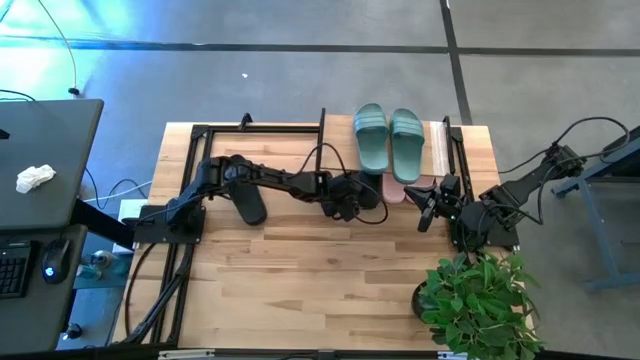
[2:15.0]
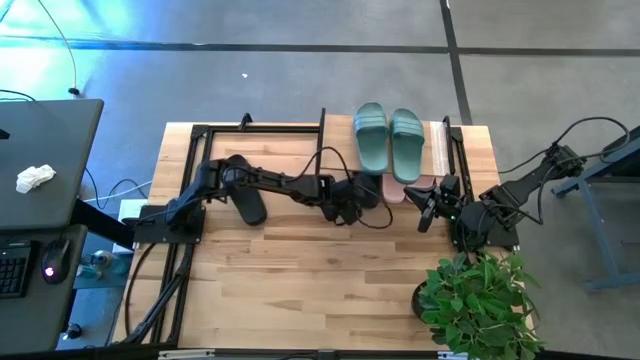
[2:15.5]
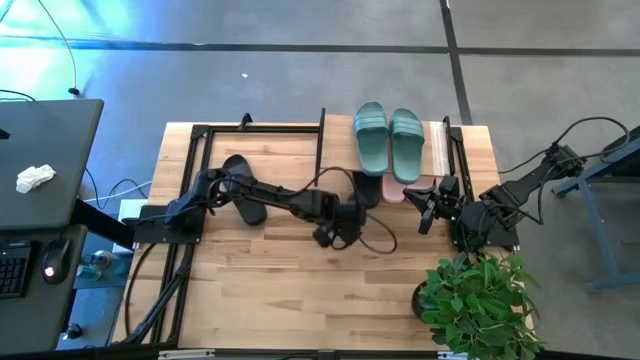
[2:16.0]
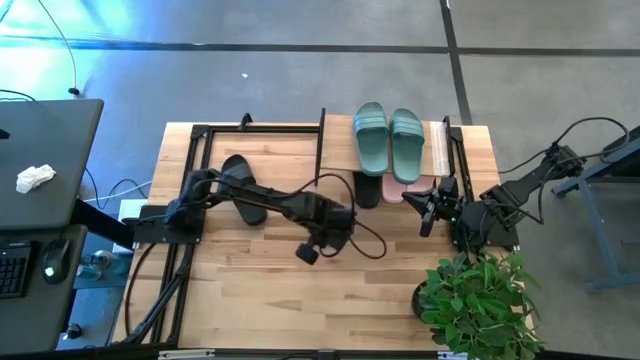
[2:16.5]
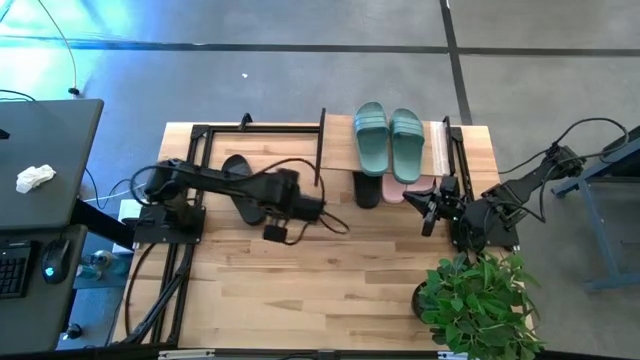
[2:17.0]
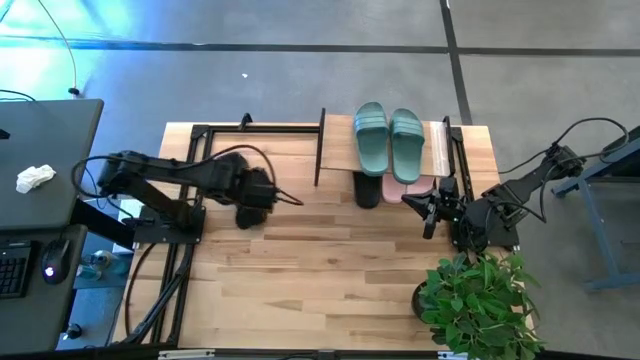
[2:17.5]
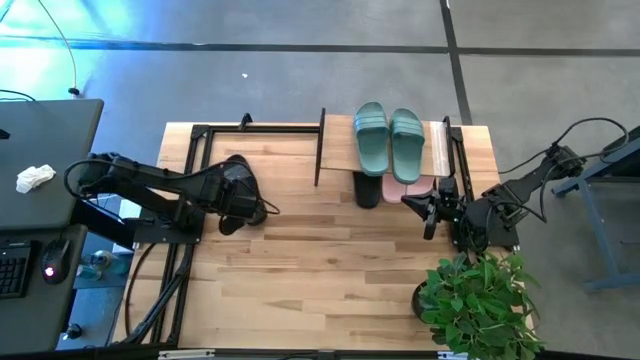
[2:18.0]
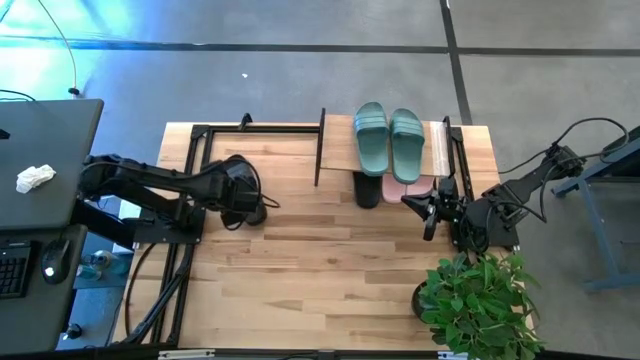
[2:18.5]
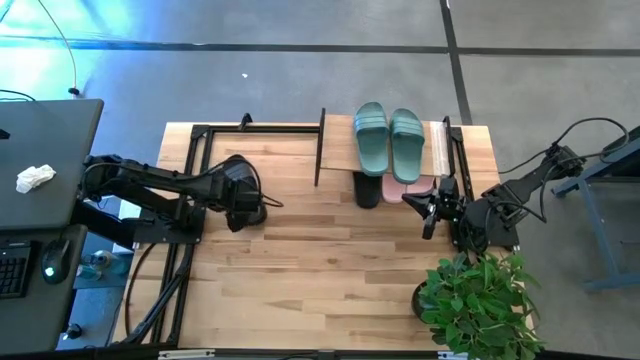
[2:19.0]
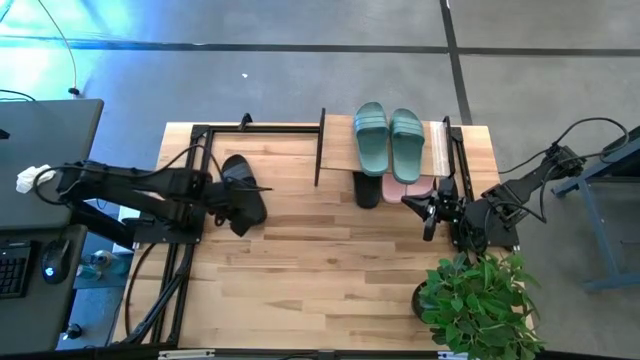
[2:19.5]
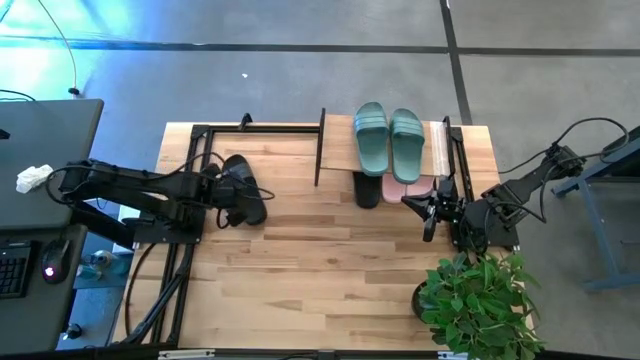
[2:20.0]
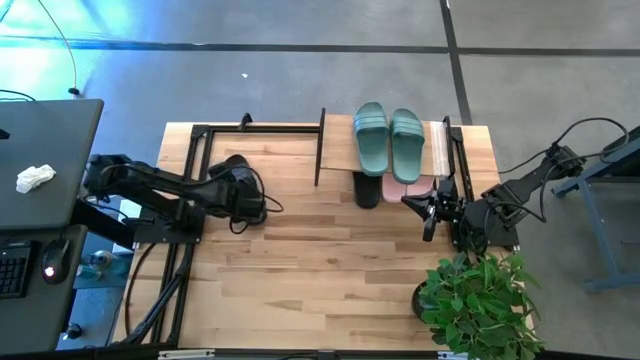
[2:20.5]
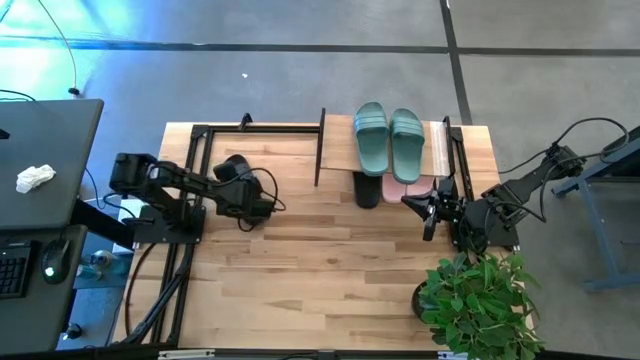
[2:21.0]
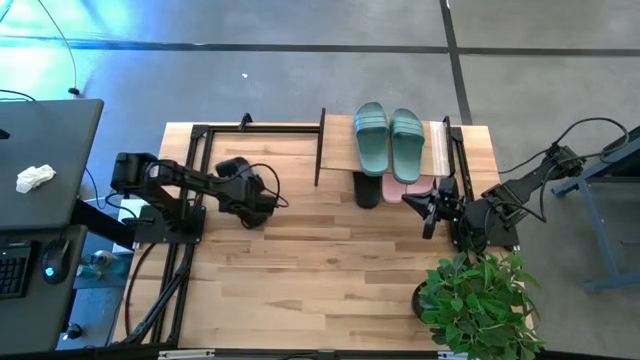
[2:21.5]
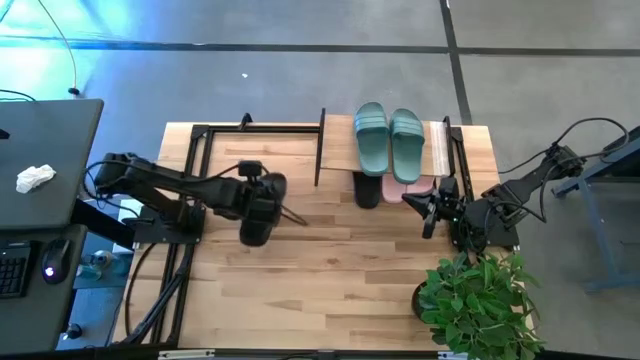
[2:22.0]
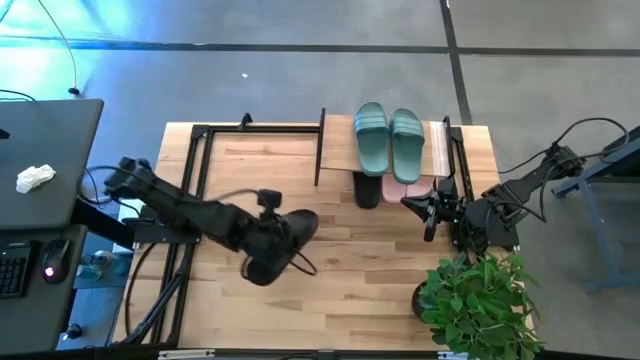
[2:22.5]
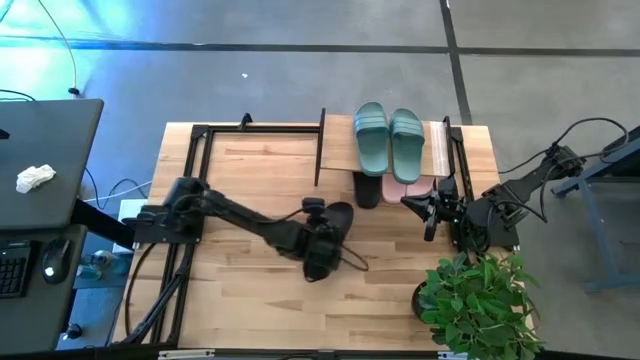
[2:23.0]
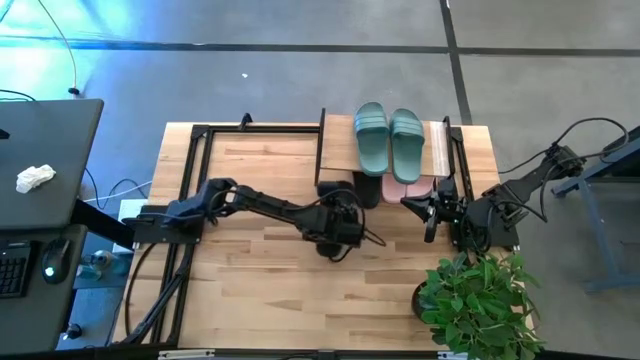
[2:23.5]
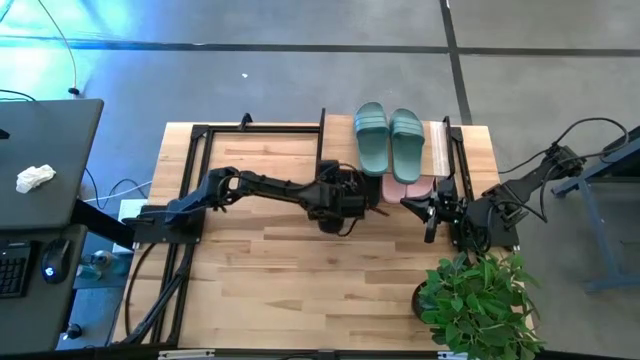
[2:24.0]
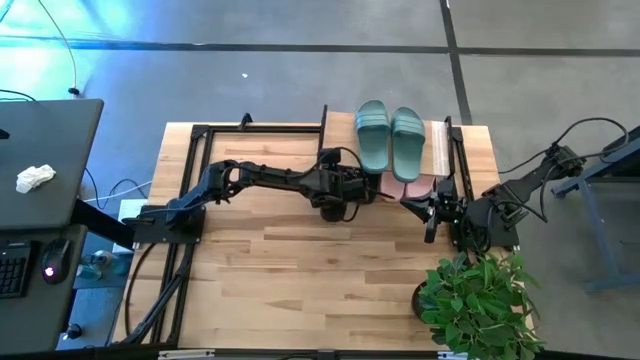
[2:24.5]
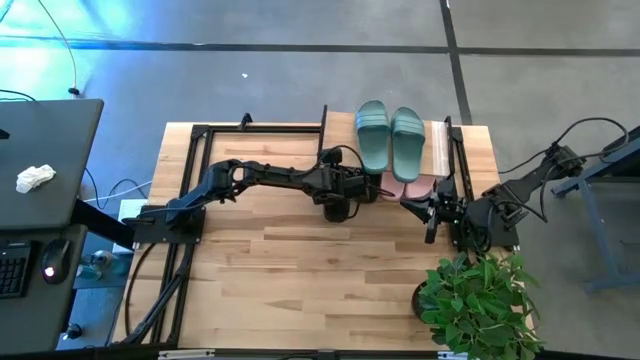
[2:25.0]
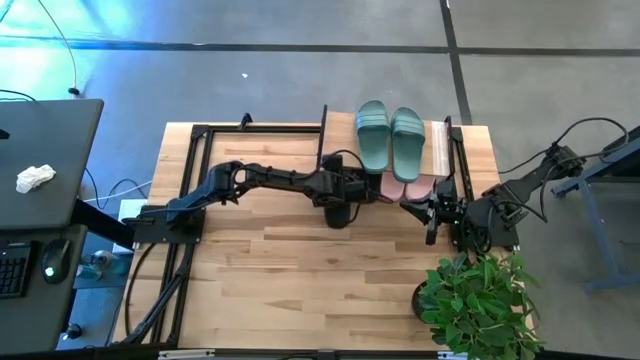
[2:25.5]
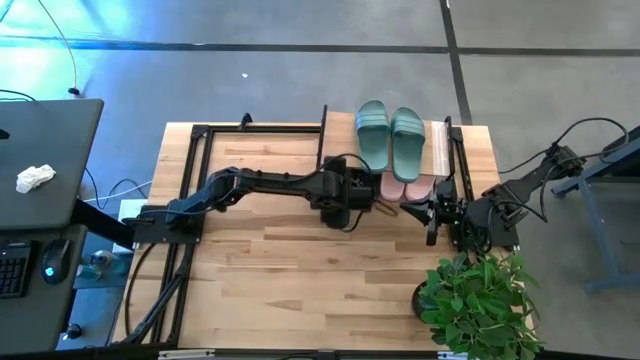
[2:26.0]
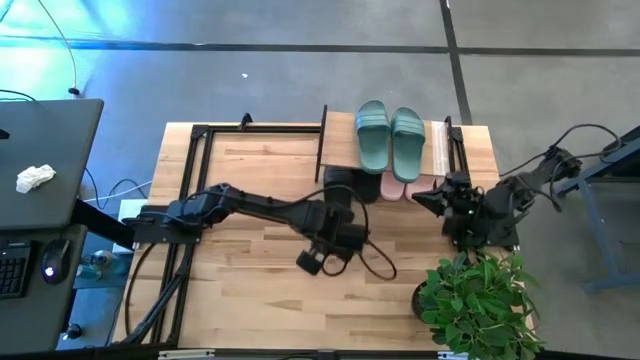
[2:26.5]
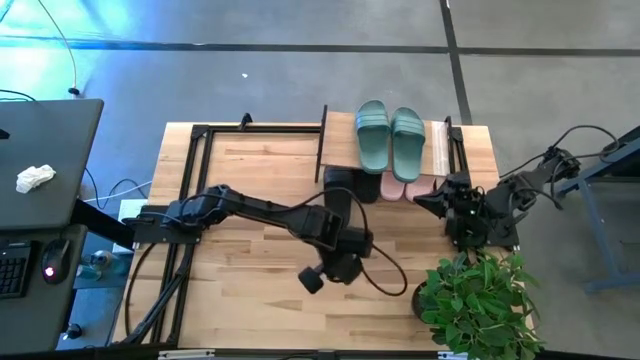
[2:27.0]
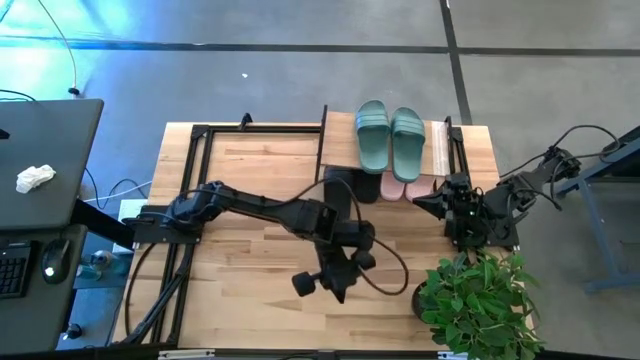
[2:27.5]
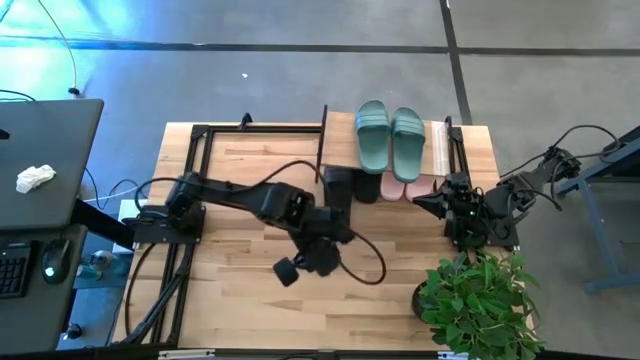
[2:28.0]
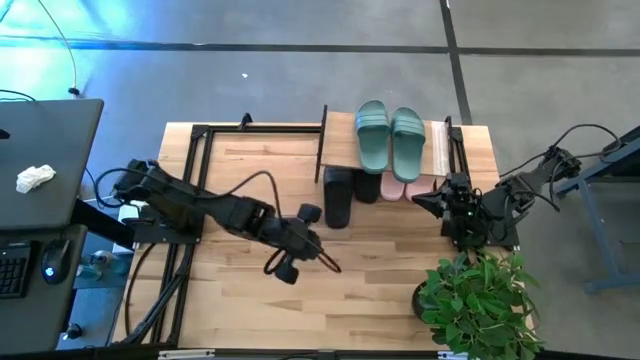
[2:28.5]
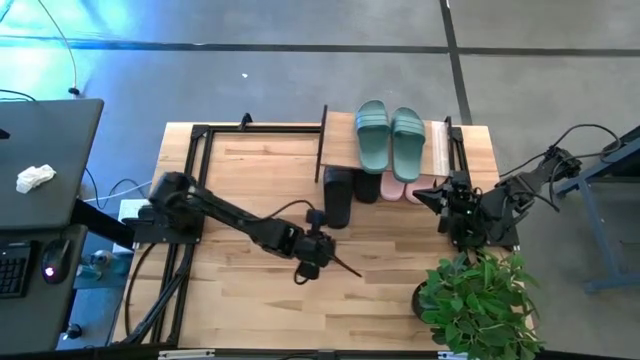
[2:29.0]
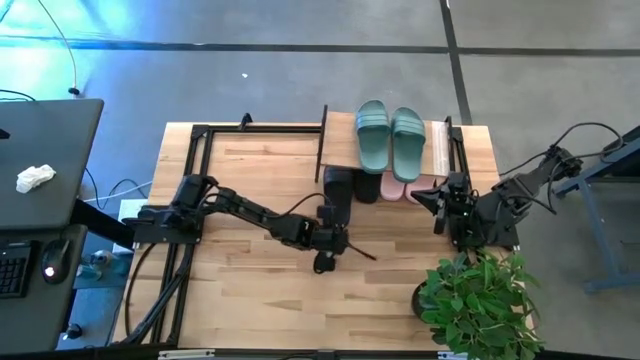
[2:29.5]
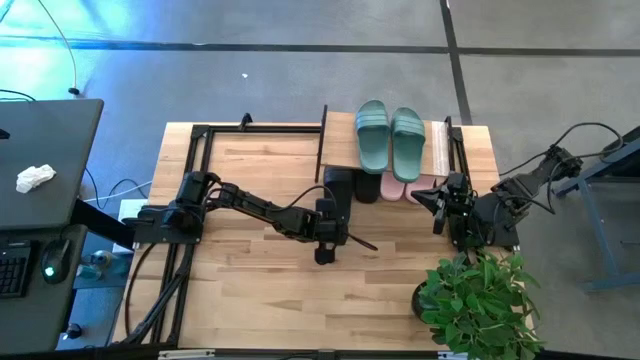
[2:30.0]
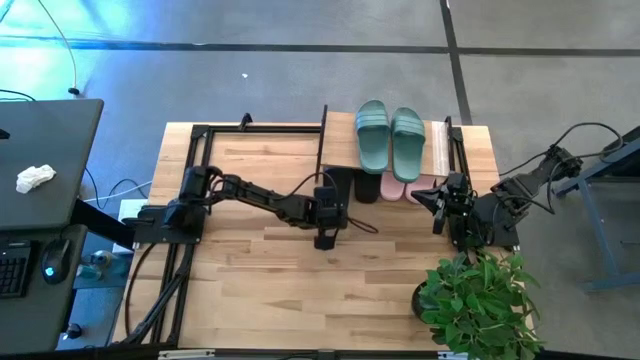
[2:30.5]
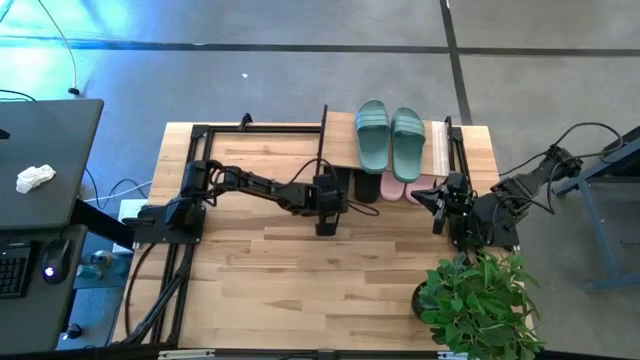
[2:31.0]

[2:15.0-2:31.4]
Task: Pick and place slides into the shelf
Put the black slides under the shelf

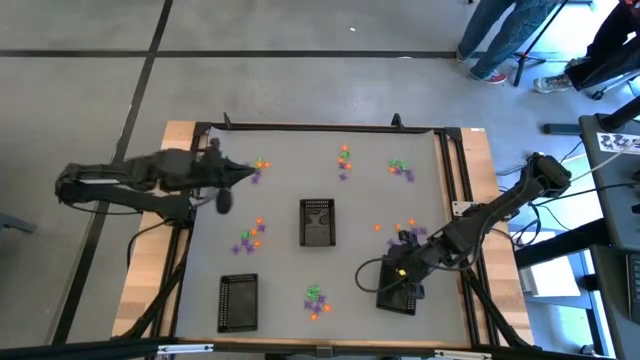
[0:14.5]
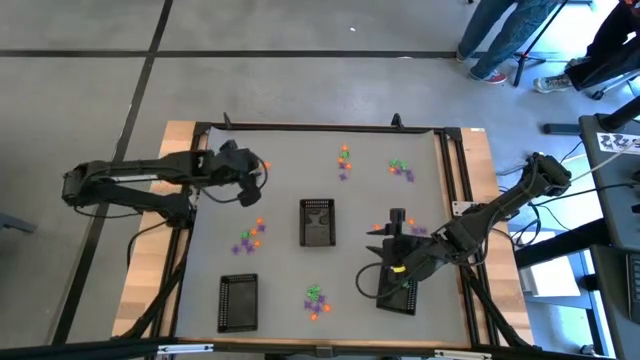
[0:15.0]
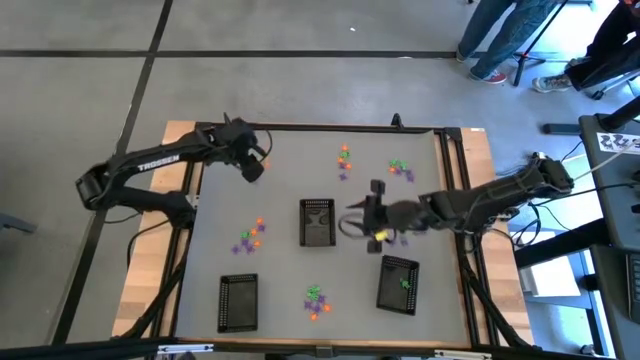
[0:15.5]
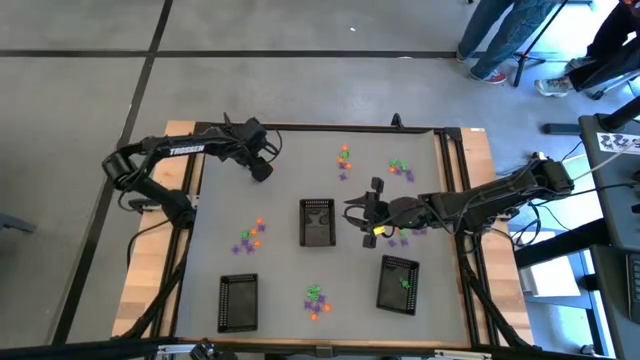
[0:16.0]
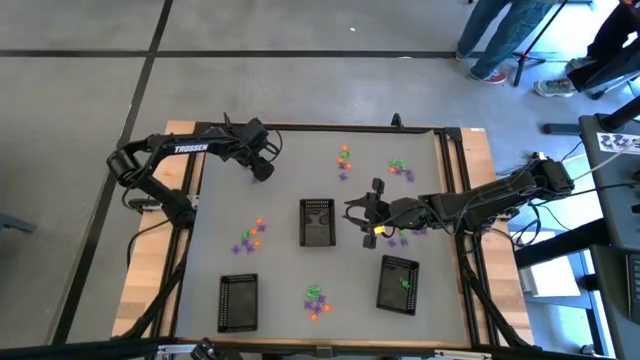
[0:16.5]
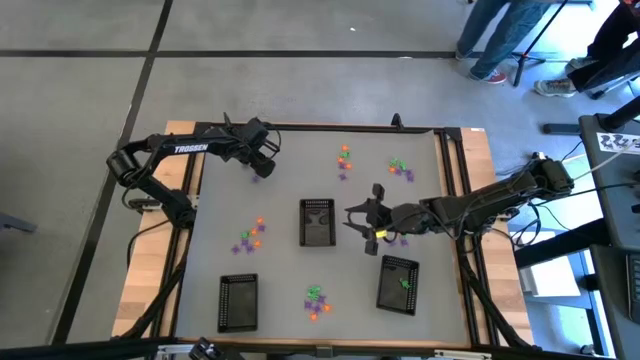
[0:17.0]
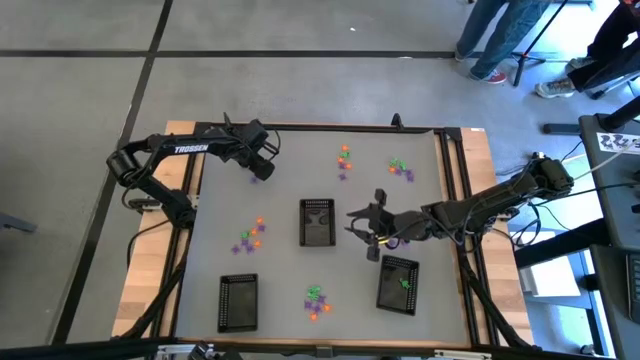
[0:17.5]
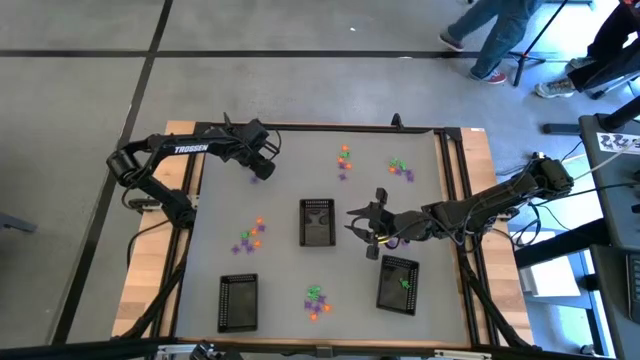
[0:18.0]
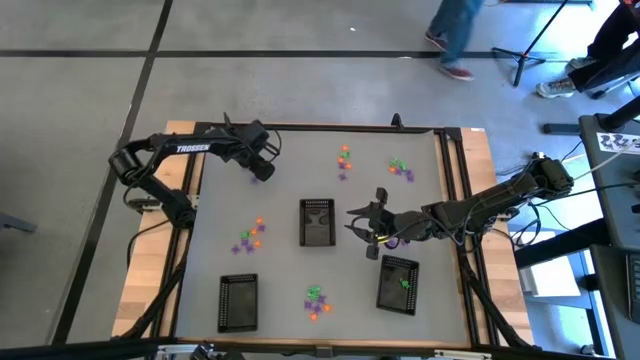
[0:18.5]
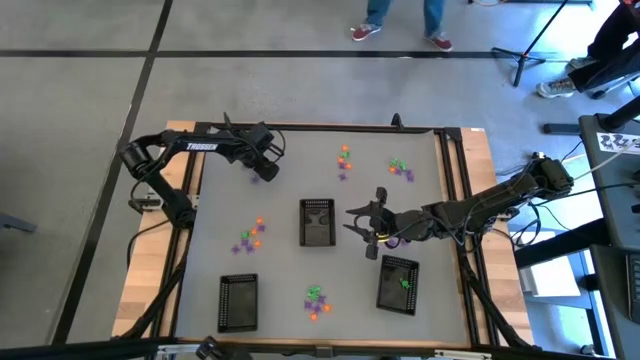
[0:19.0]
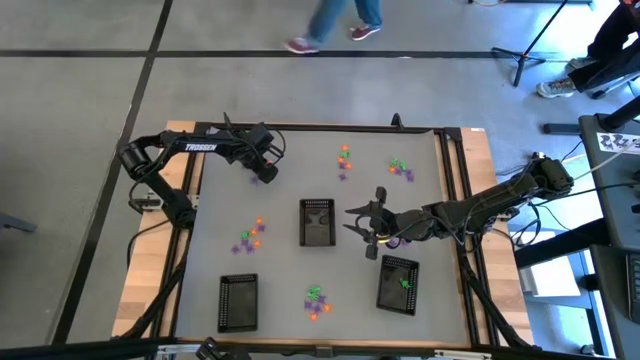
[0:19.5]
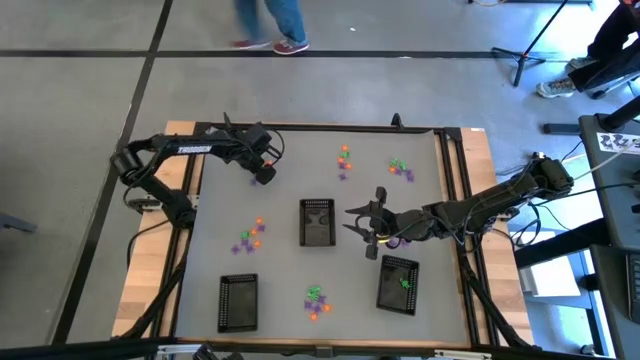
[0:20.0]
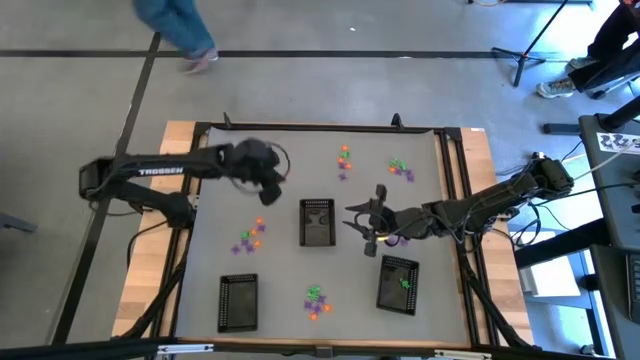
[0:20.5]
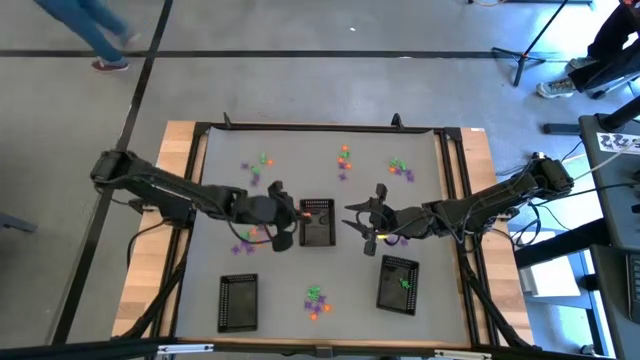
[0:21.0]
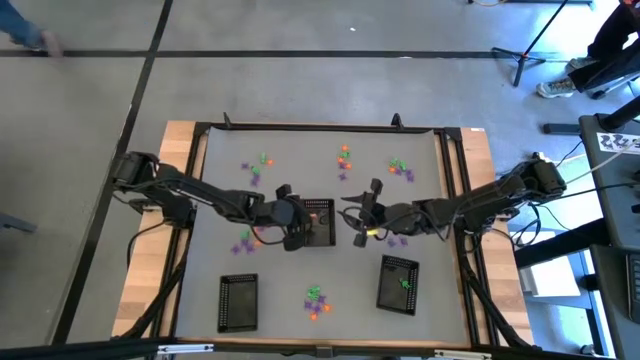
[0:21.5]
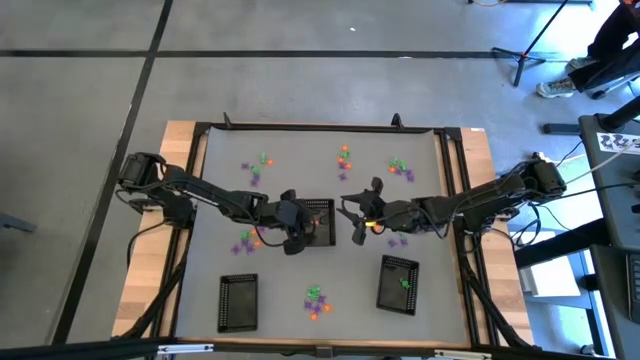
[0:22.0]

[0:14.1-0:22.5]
Task: Sort Halloween decoration
Put the orange spider toy into the top black bin
